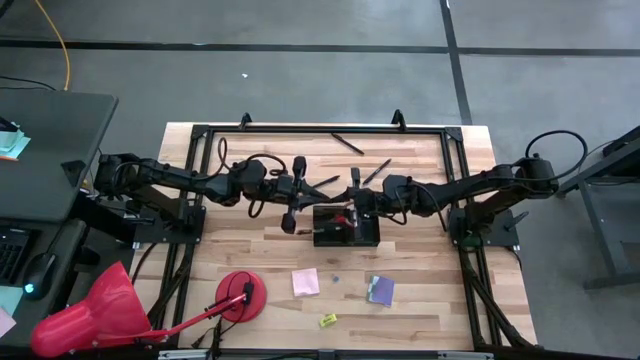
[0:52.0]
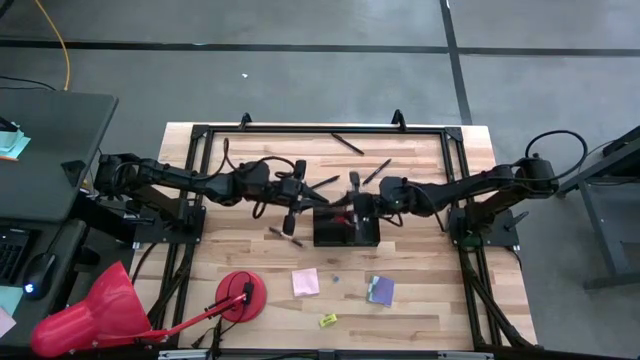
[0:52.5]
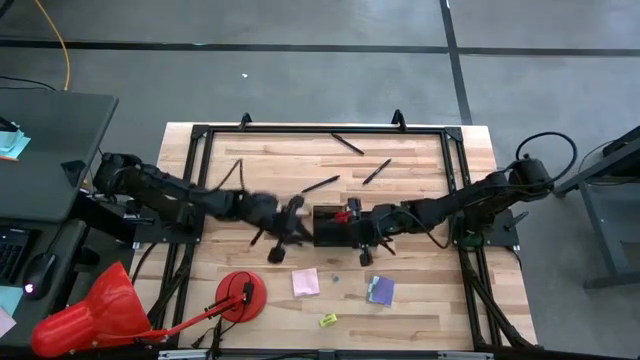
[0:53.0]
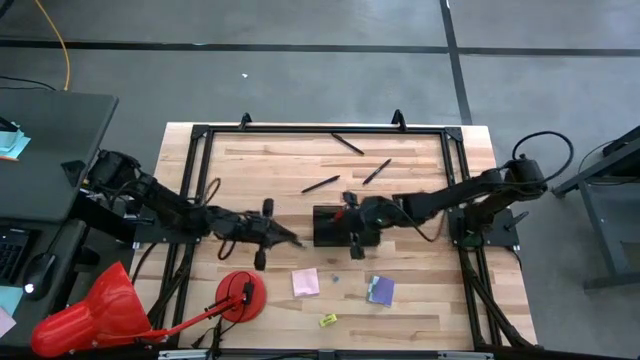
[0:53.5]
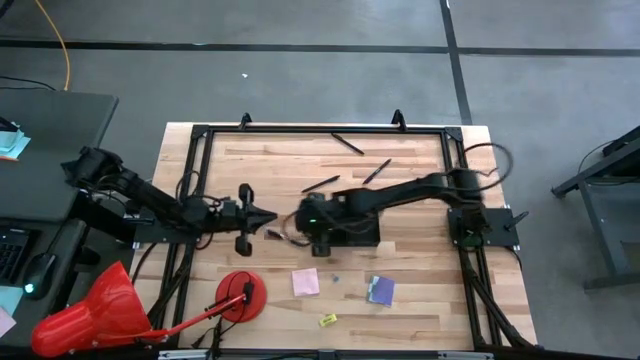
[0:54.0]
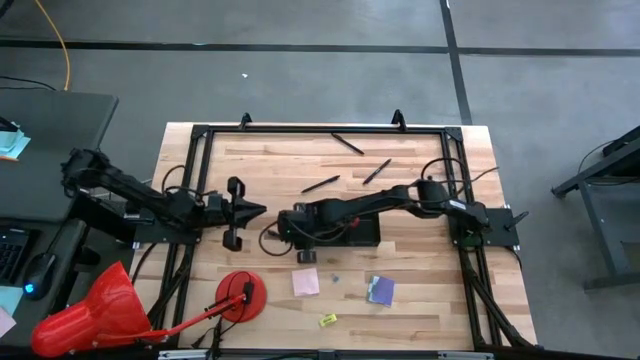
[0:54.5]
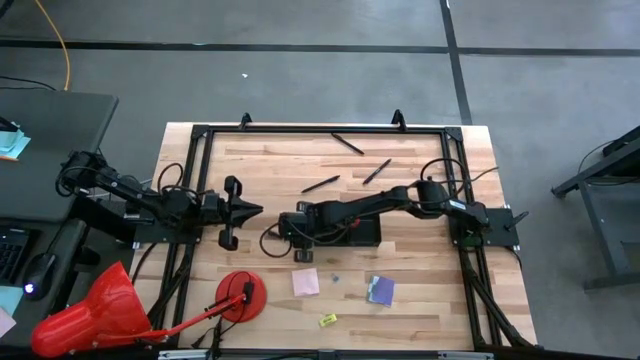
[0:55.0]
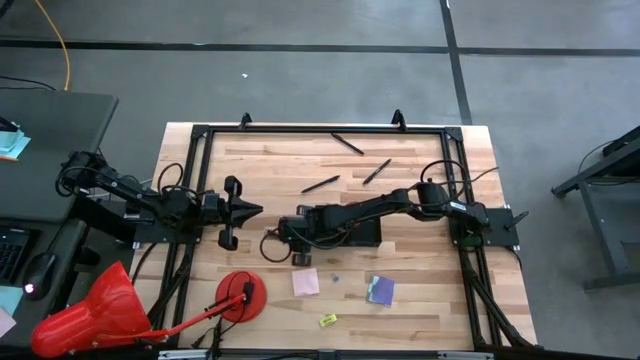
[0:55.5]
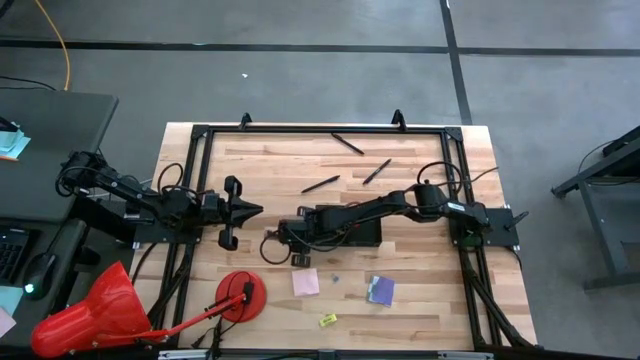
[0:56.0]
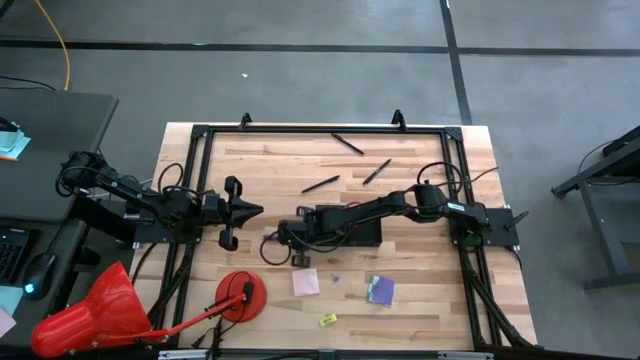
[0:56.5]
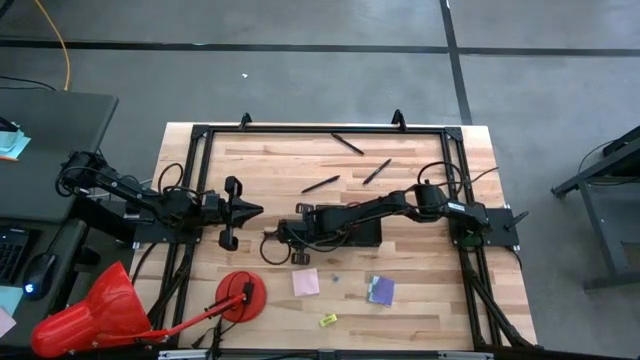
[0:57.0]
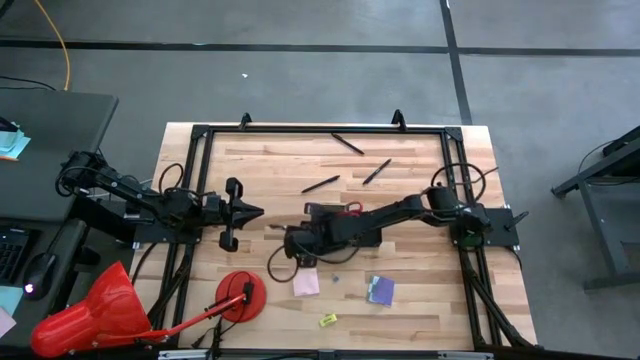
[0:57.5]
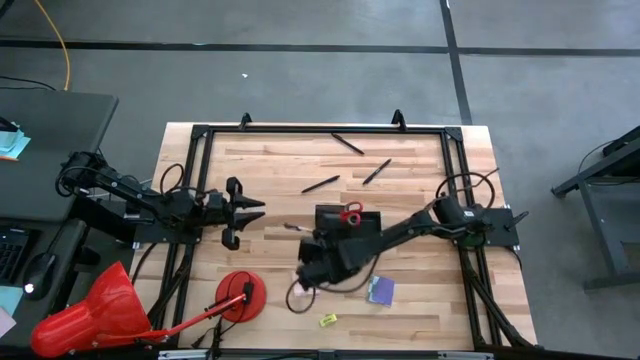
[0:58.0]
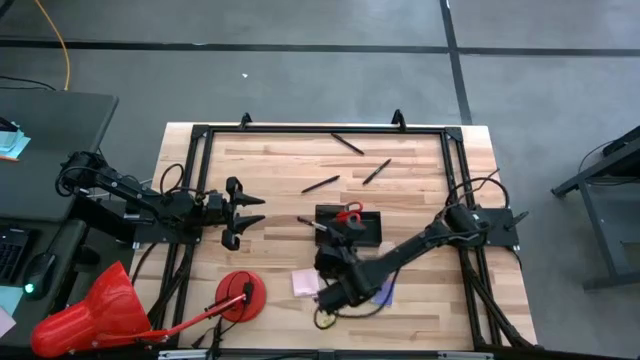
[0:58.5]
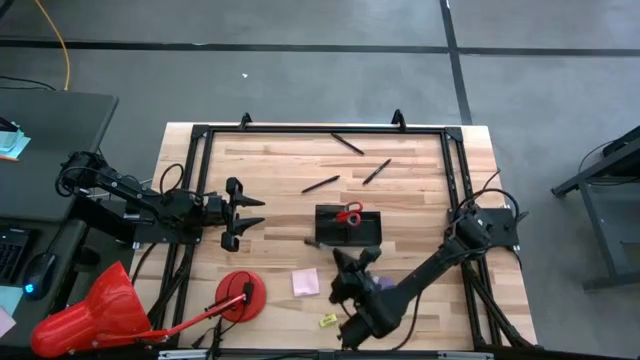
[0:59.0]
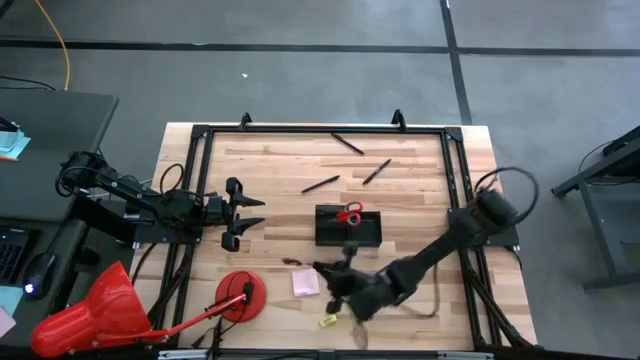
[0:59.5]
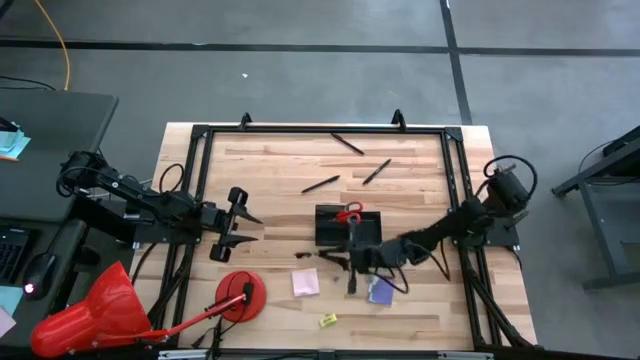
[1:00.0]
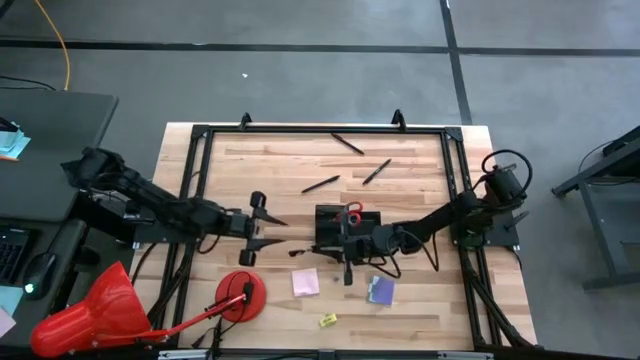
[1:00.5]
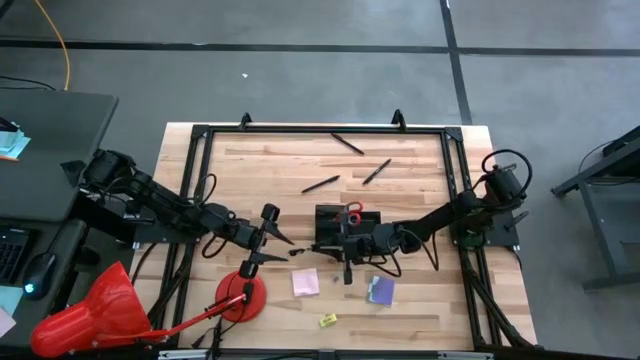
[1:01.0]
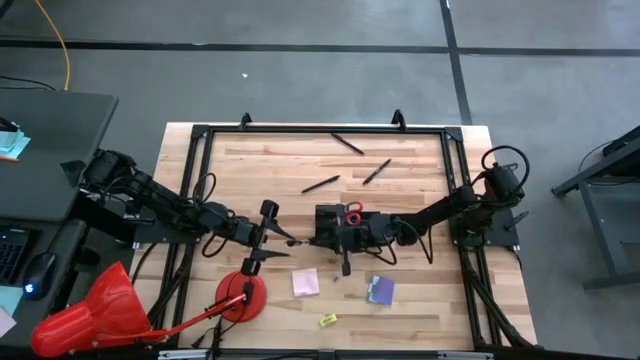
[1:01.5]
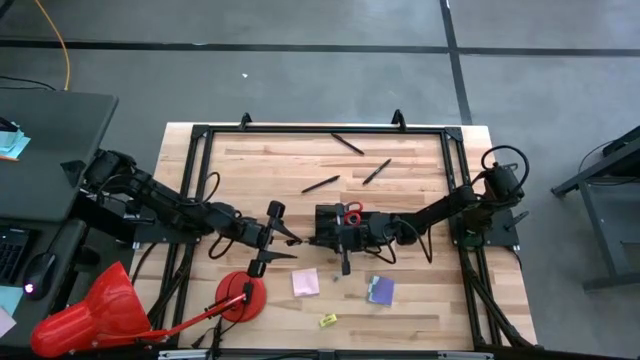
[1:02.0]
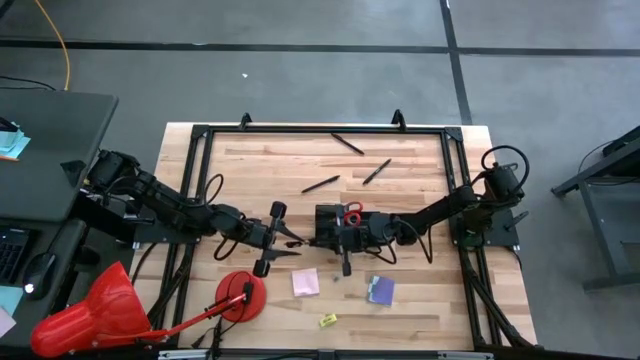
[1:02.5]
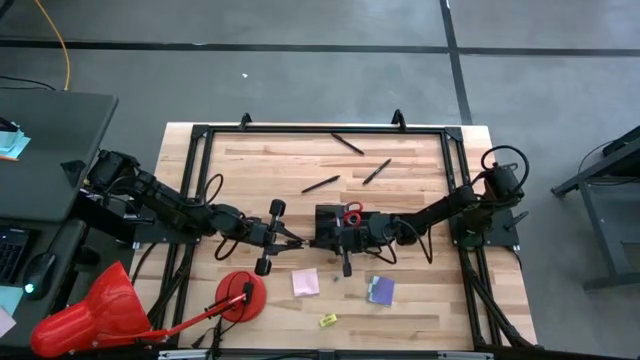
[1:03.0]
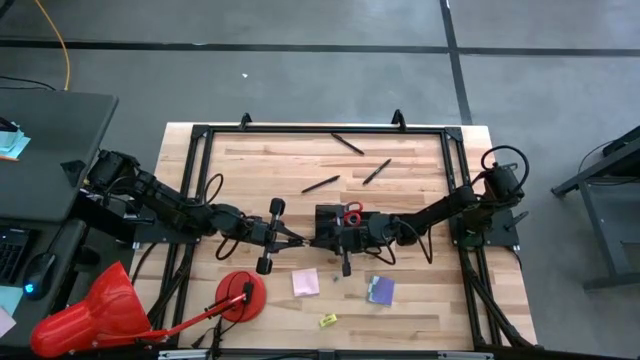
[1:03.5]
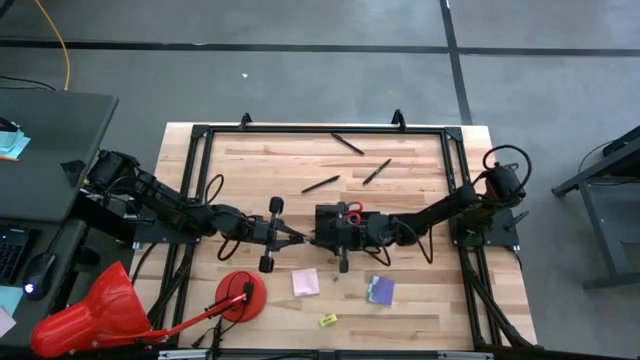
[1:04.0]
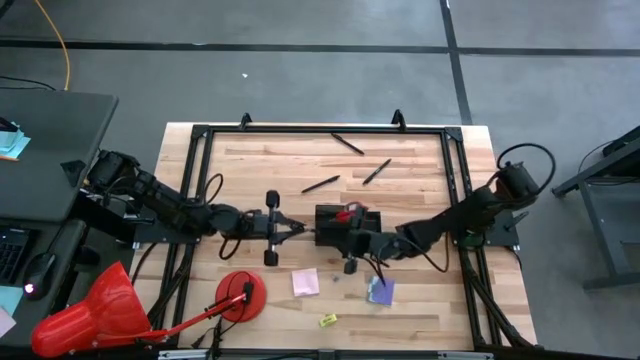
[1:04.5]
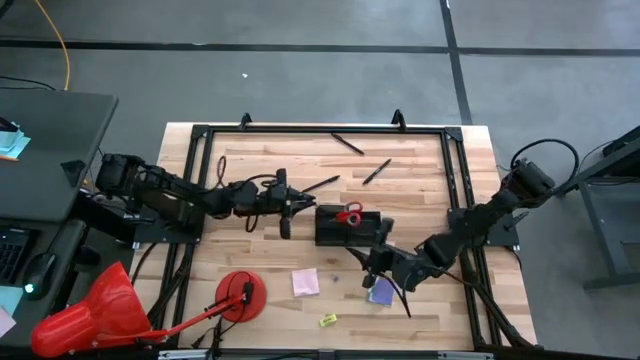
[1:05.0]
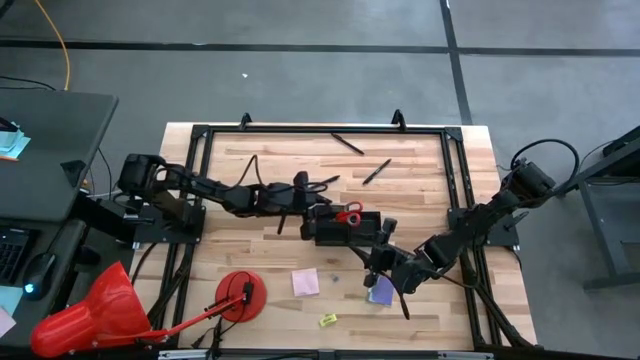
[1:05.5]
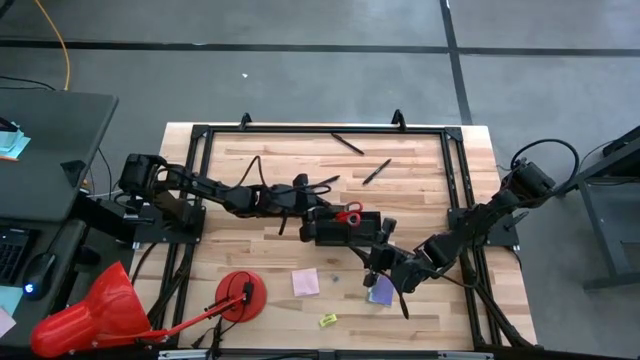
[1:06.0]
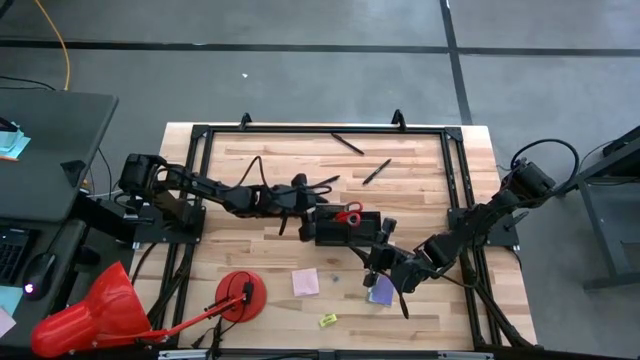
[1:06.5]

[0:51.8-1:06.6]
Task: Pick and place office supplies into organizer
Put the black pen into the black desk organizer

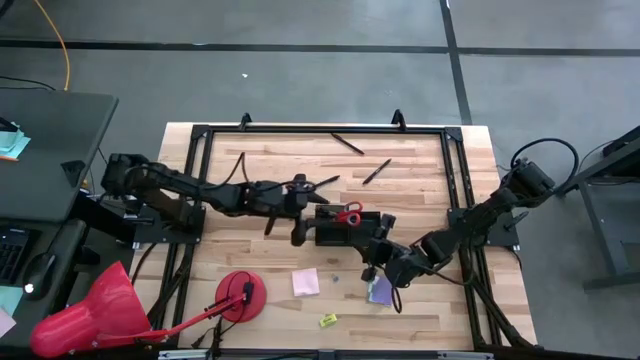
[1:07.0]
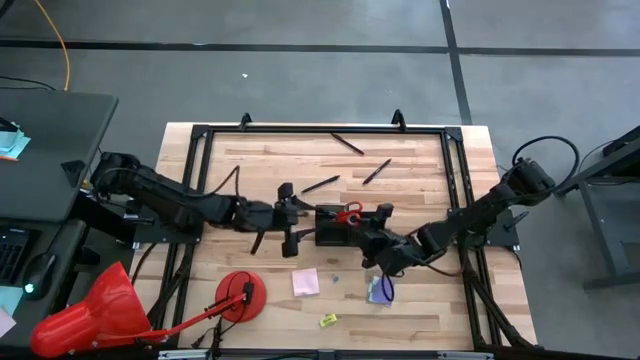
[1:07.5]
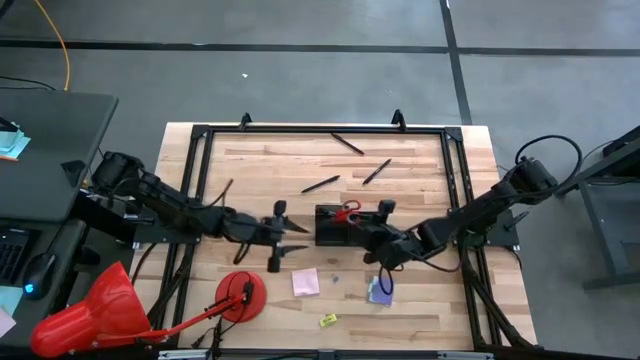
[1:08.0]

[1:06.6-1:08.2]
Adjust the red scissor in black desk organizer

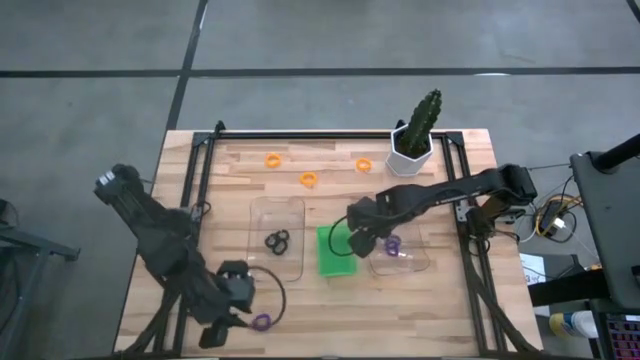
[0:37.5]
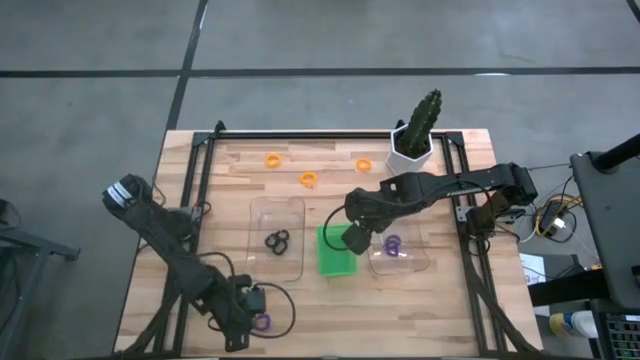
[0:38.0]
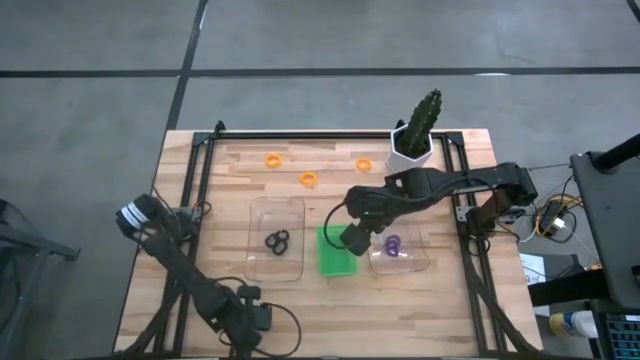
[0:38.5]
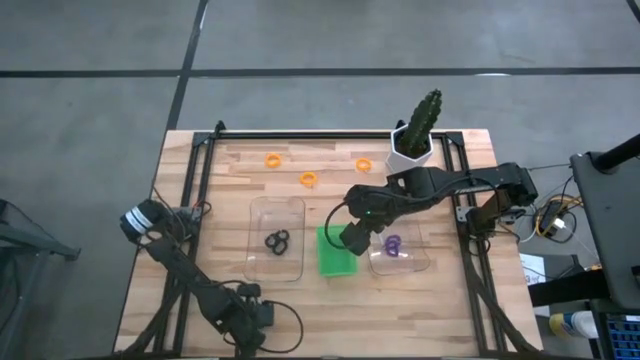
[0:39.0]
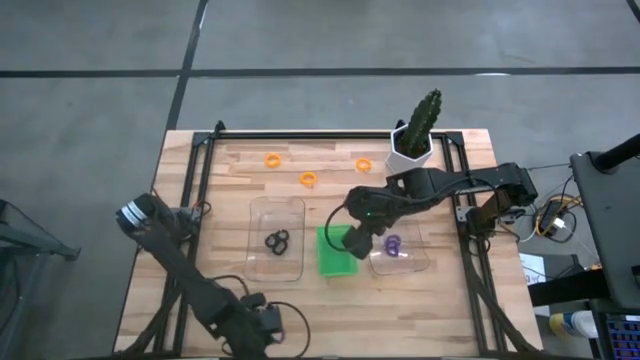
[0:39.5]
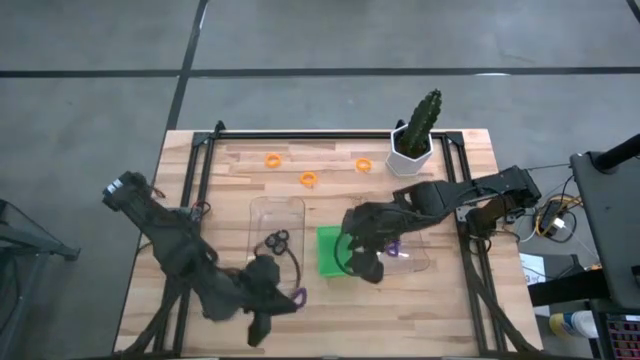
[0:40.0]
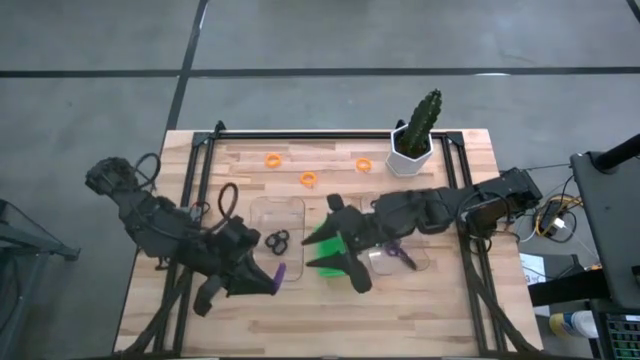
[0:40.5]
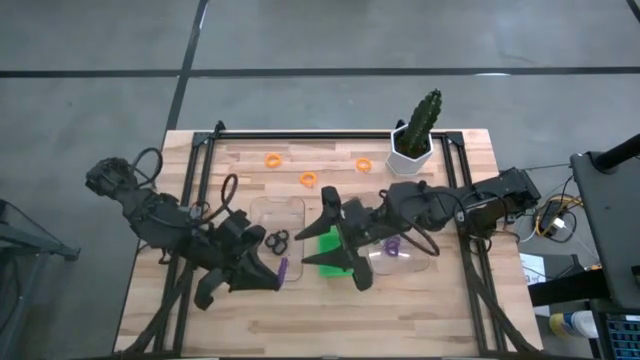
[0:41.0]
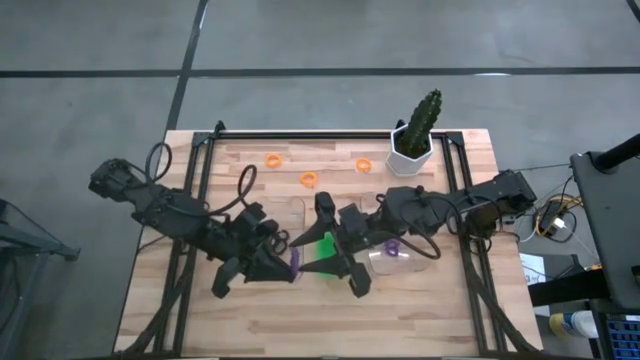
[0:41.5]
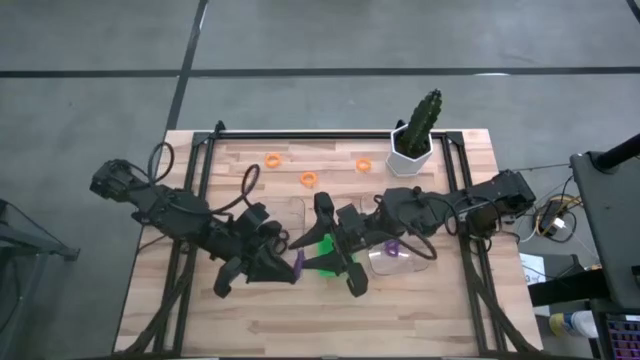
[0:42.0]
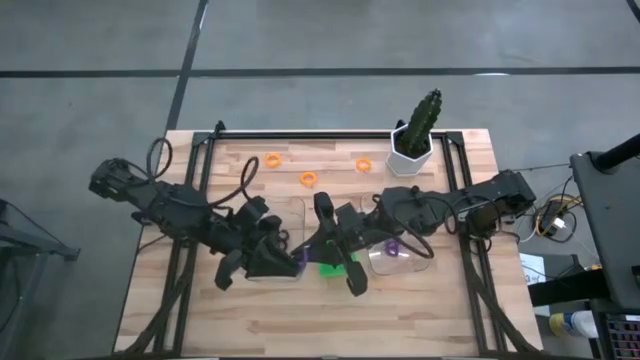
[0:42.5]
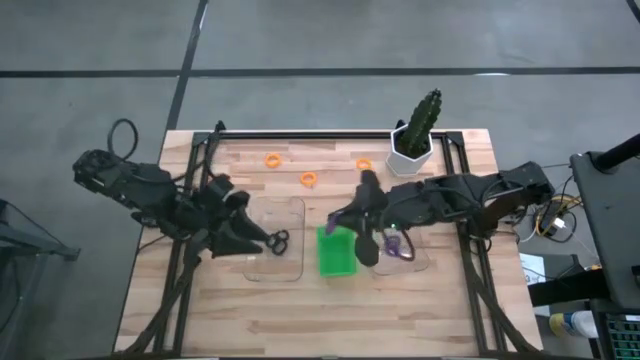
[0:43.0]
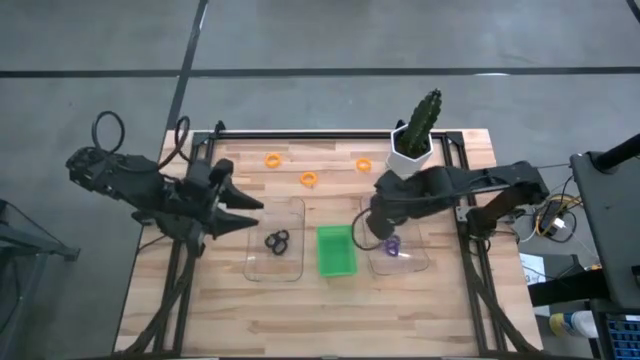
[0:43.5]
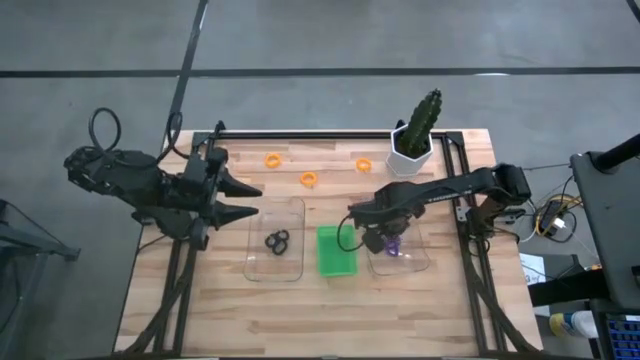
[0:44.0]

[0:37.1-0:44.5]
Task: Sort spring keychains
Put the violet spring keychain into the right transparent bin
